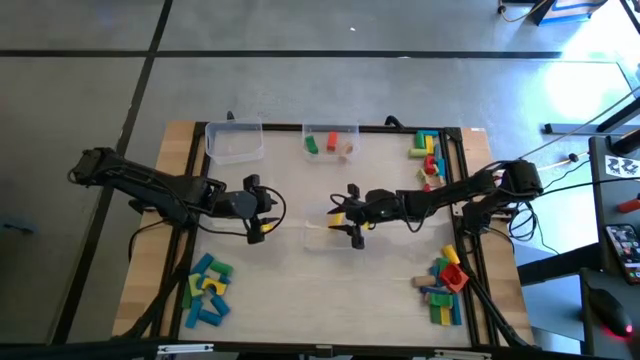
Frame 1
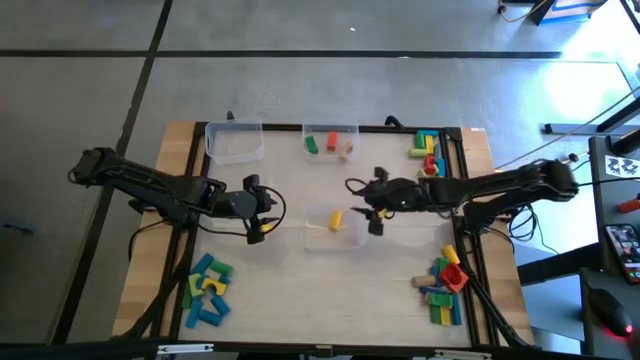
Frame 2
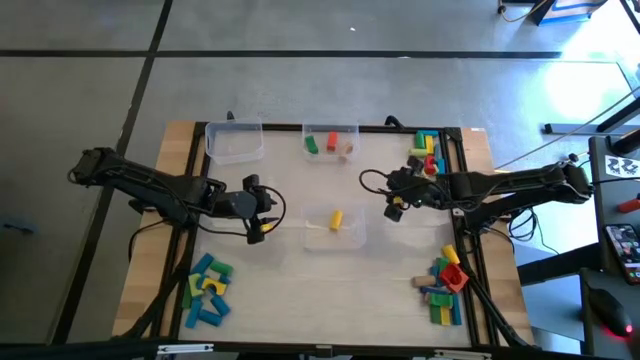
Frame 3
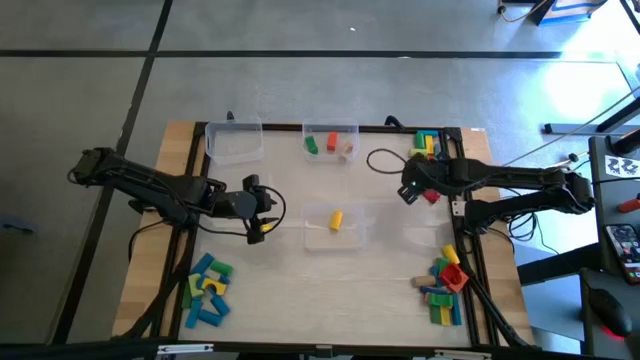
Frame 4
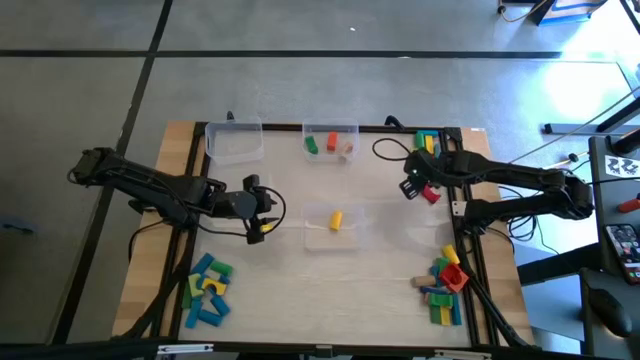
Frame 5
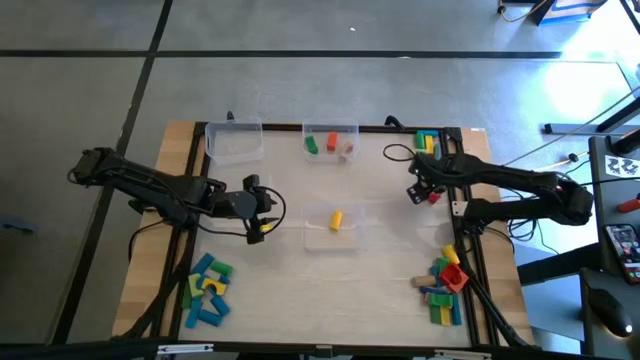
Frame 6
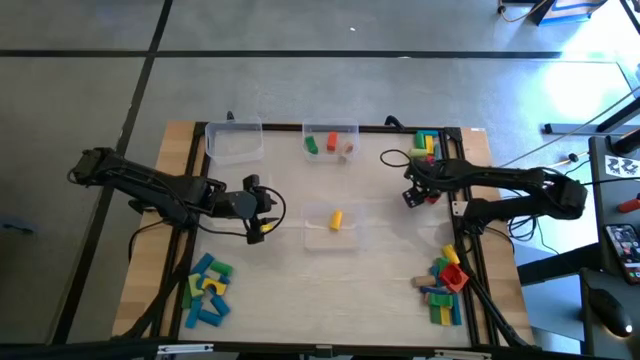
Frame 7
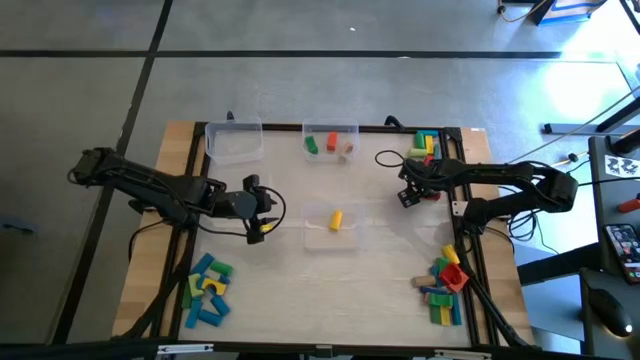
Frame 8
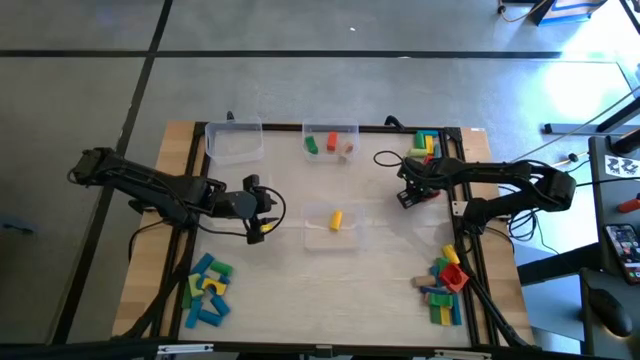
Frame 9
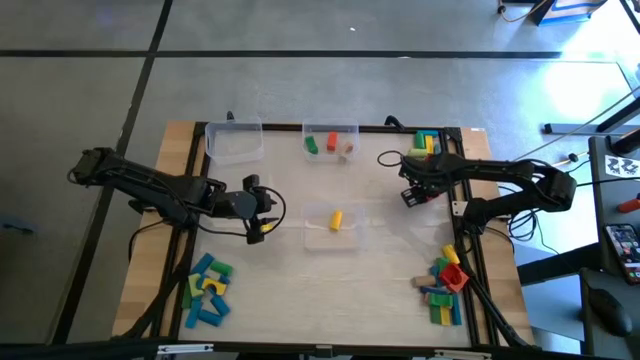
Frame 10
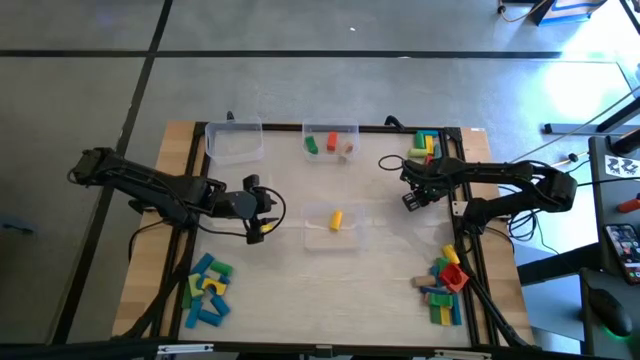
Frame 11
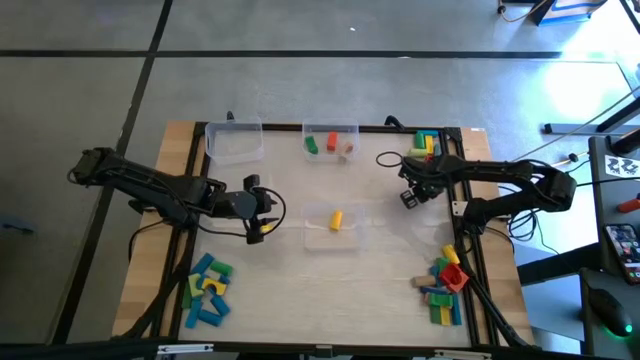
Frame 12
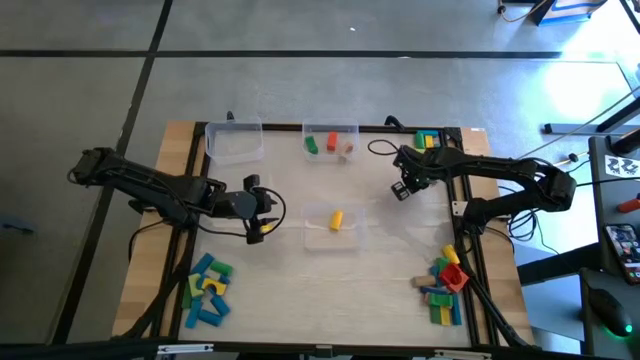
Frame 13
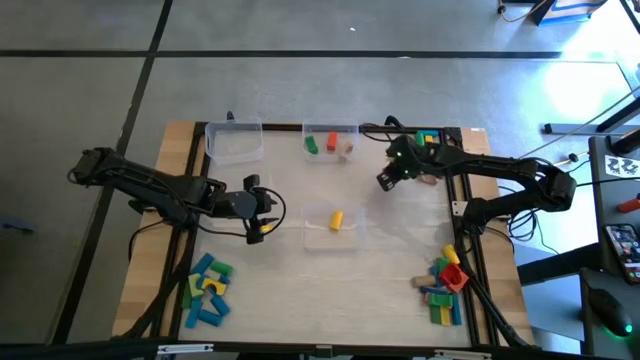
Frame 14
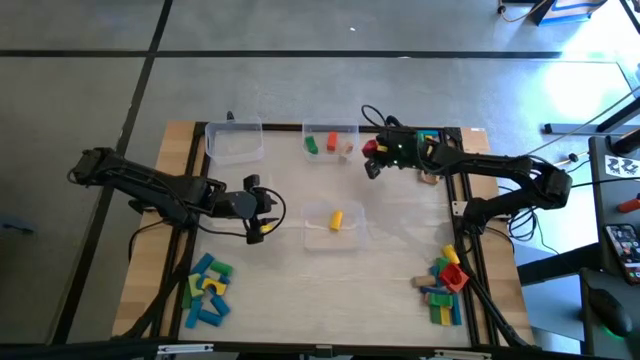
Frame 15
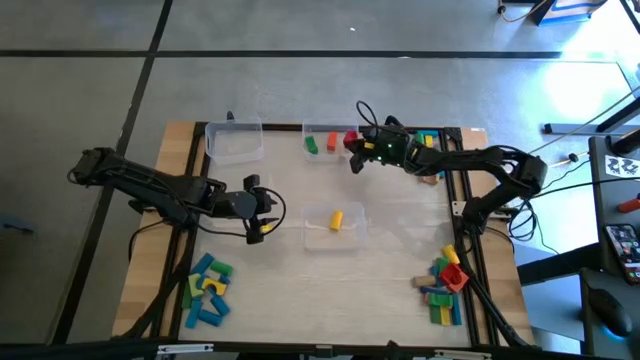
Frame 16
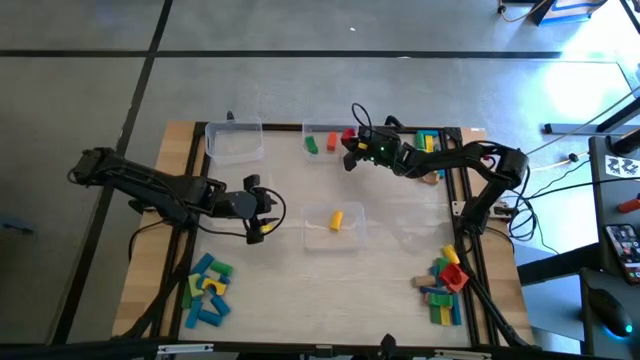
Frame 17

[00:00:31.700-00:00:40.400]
Task: Sort blocks by size
Put the red arch block into the top right transparent bin

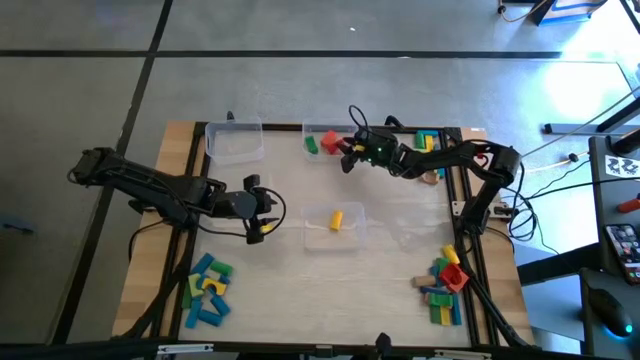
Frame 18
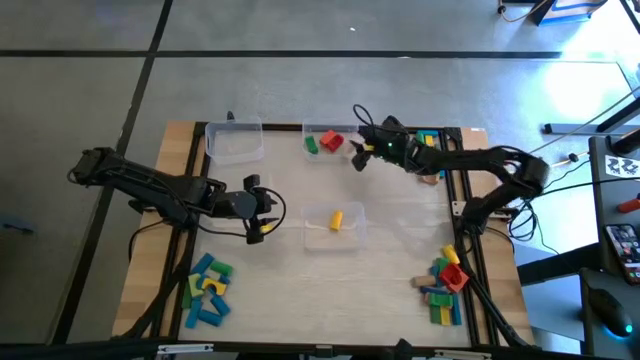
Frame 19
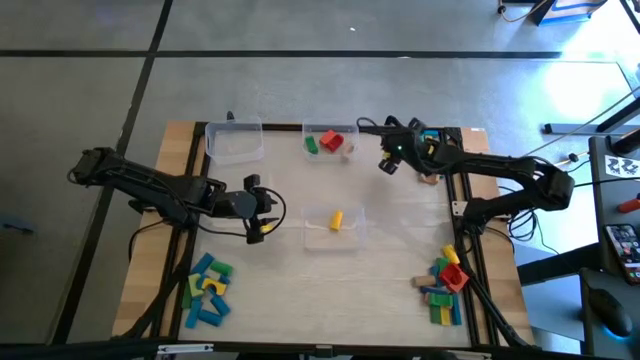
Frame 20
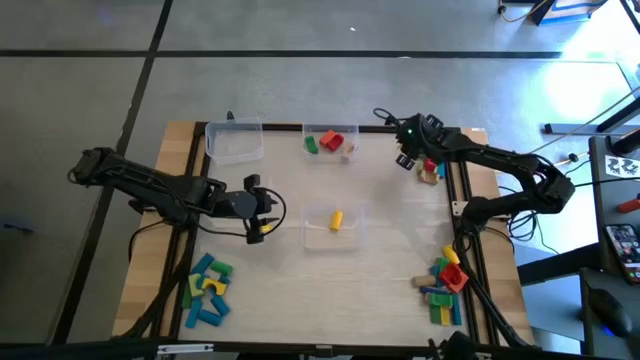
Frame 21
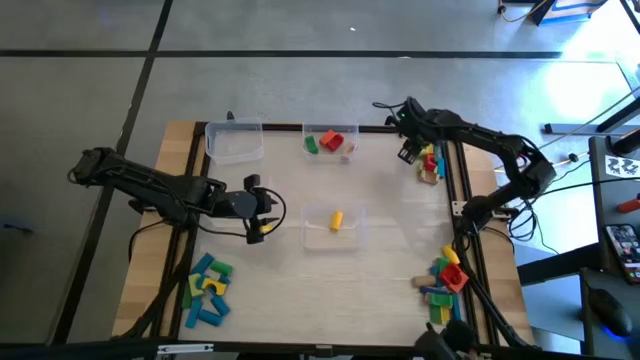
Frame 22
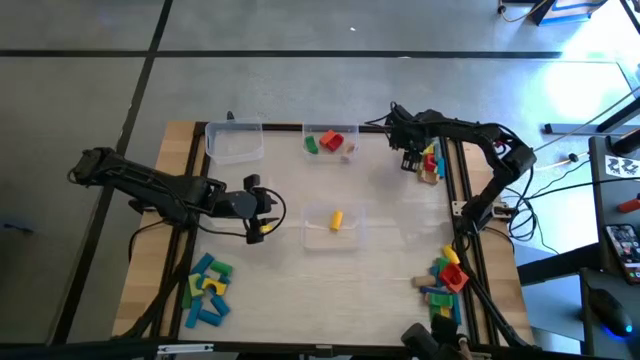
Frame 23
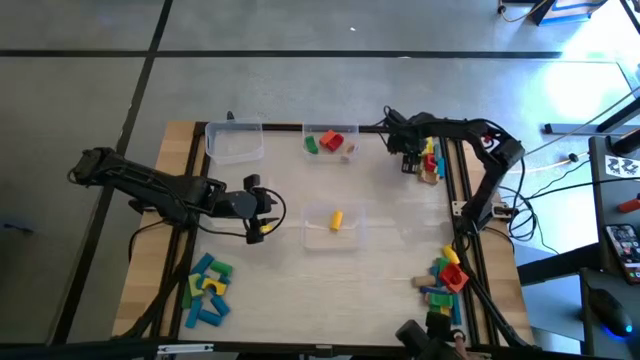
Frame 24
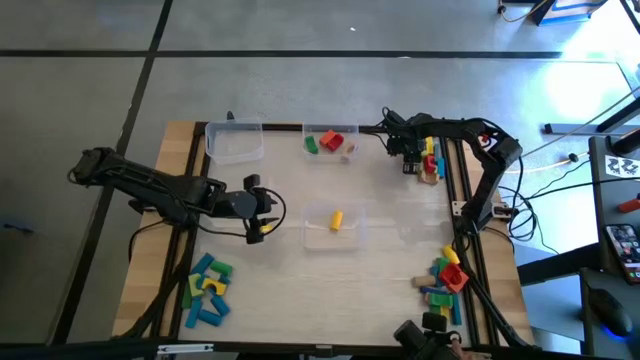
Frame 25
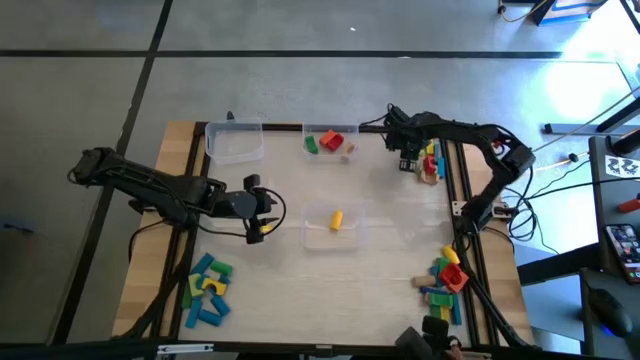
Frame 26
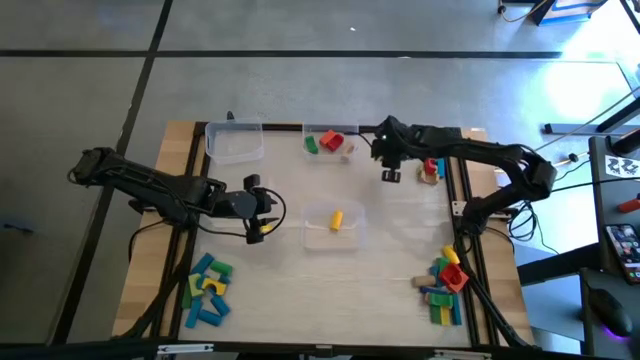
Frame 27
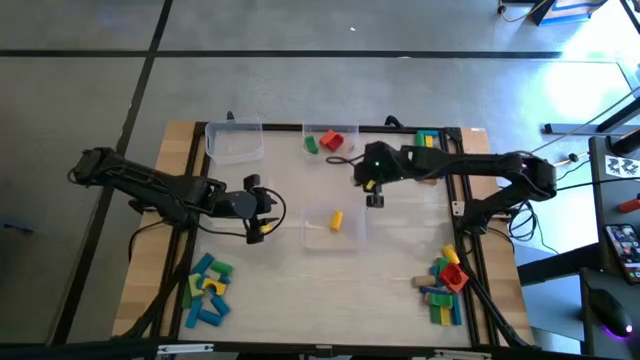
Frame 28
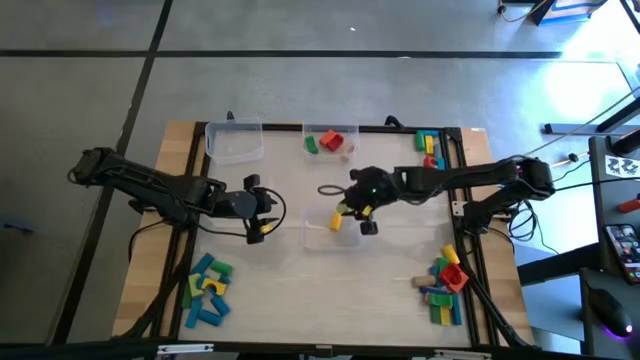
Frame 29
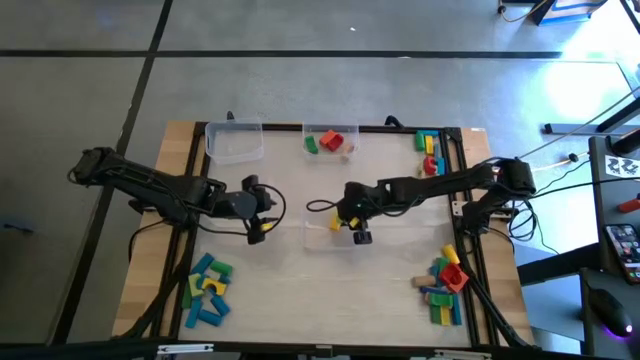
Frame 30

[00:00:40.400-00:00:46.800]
Put the light green cylindrical block into the bottom transparent bin

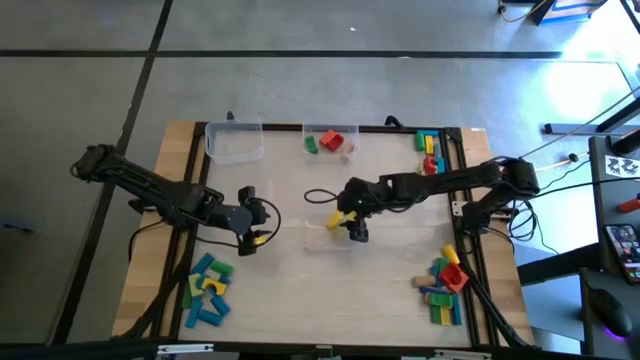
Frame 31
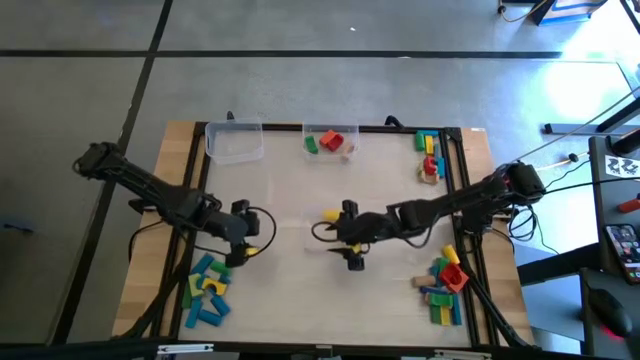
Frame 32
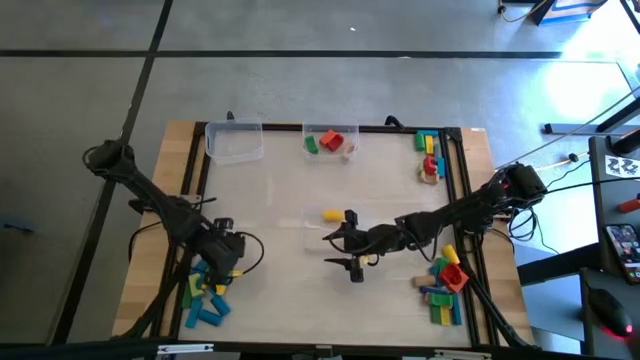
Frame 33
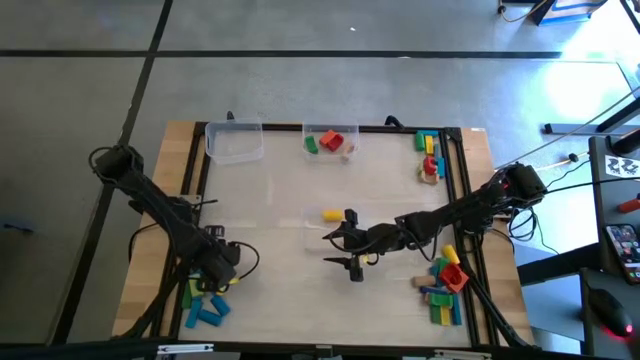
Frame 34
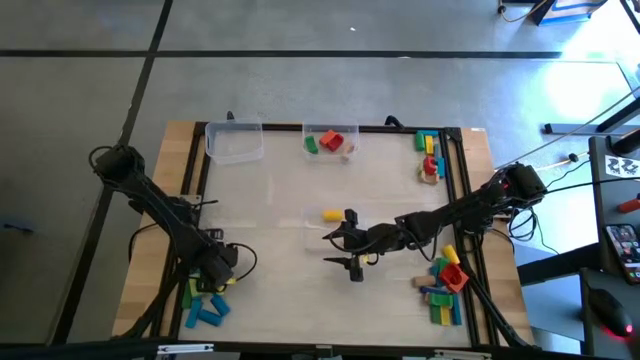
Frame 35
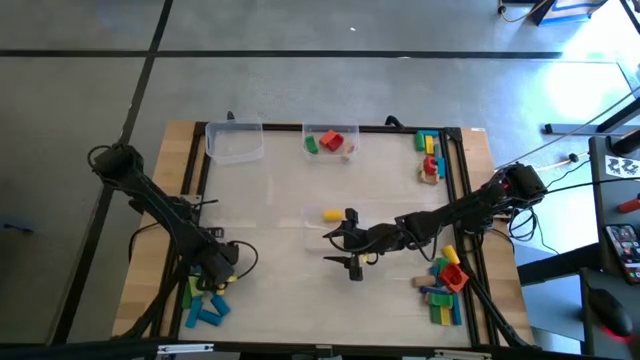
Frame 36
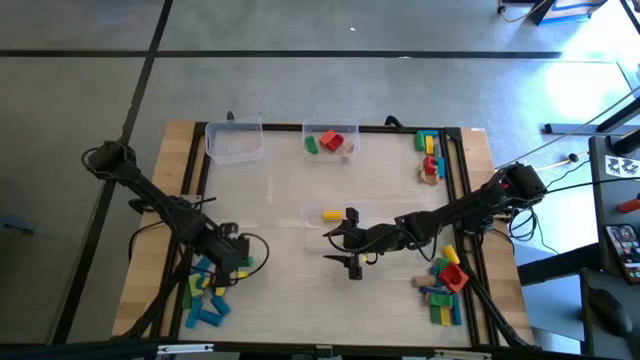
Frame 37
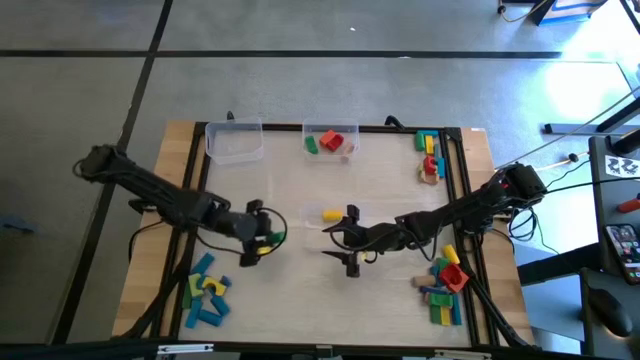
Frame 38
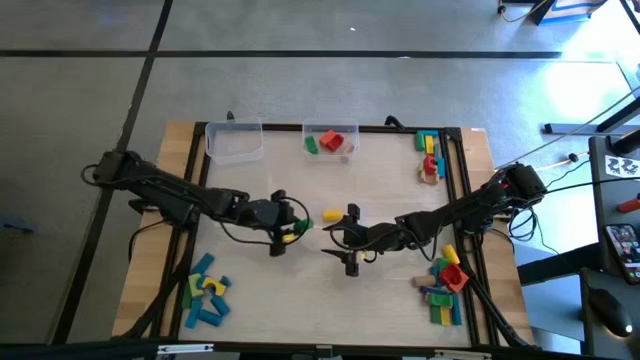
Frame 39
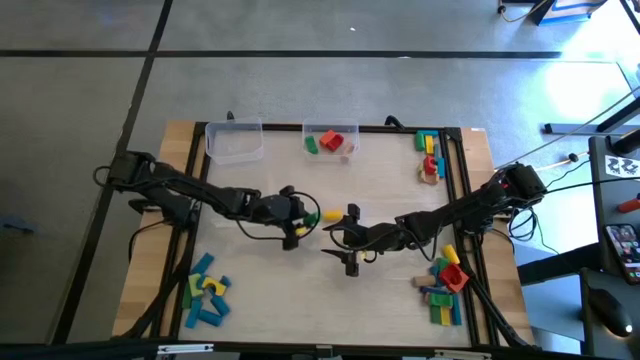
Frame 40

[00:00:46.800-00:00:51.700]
Put the green cylindrical block into the bottom transparent bin
